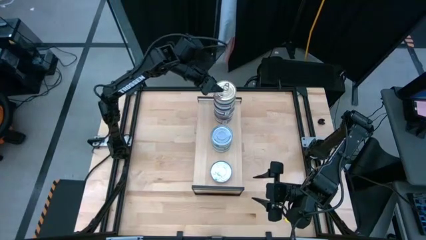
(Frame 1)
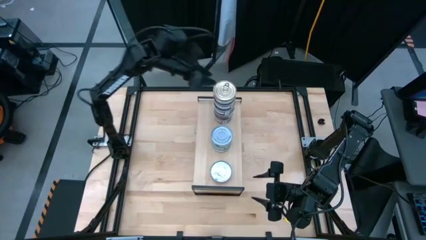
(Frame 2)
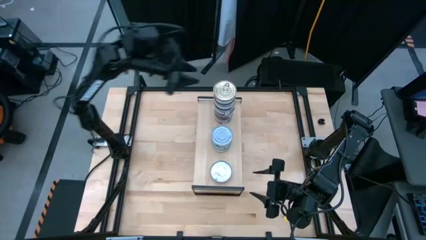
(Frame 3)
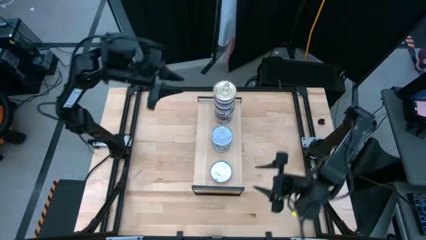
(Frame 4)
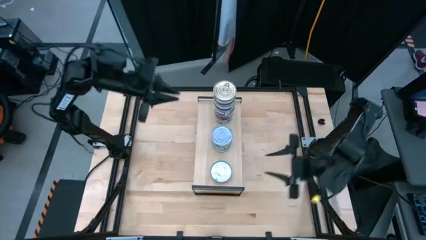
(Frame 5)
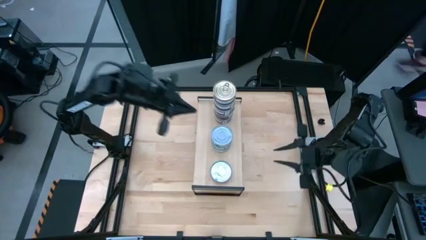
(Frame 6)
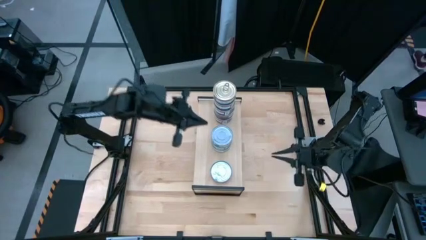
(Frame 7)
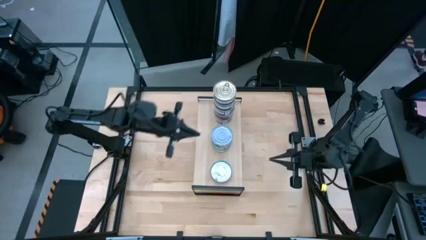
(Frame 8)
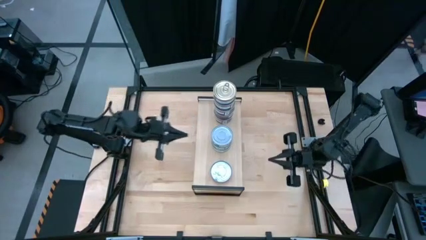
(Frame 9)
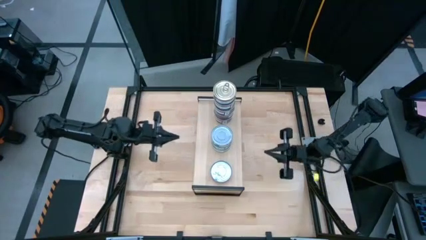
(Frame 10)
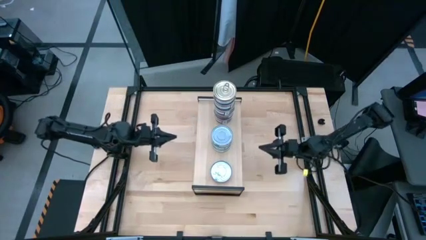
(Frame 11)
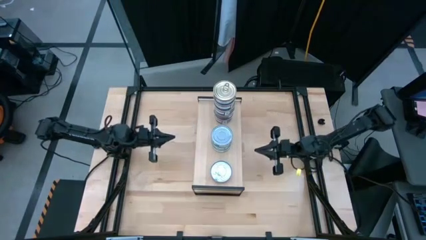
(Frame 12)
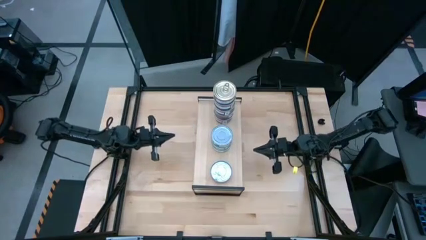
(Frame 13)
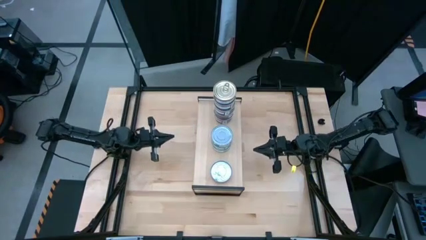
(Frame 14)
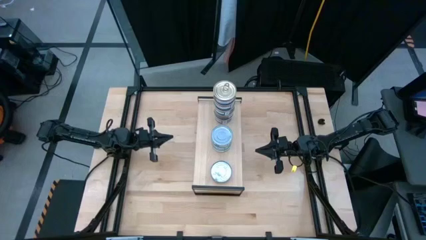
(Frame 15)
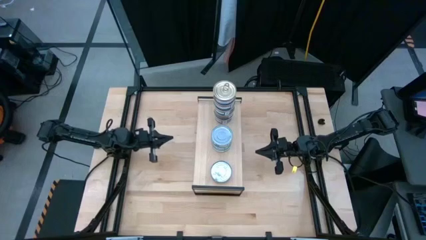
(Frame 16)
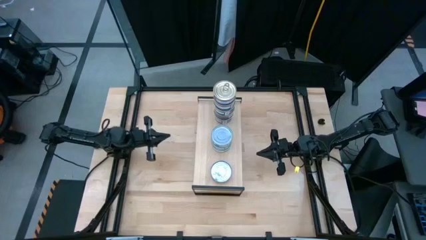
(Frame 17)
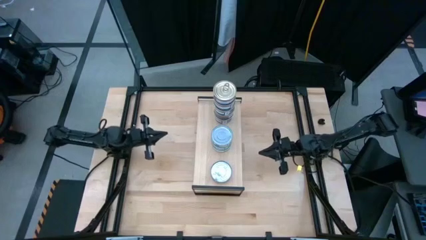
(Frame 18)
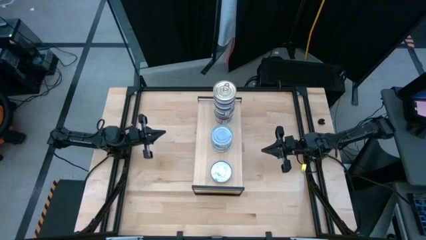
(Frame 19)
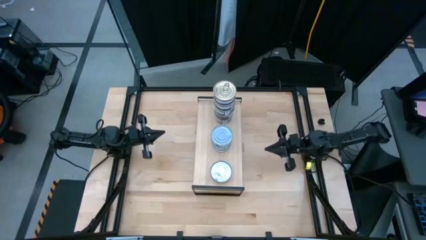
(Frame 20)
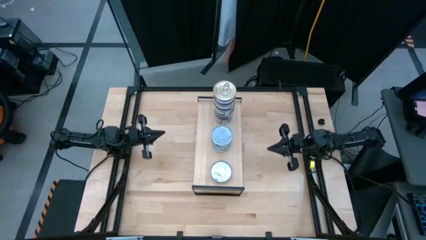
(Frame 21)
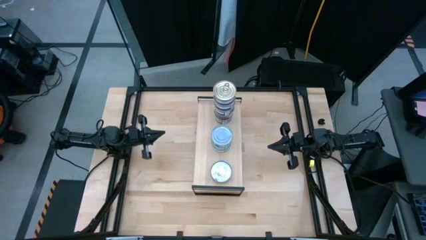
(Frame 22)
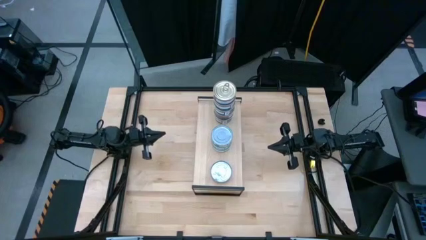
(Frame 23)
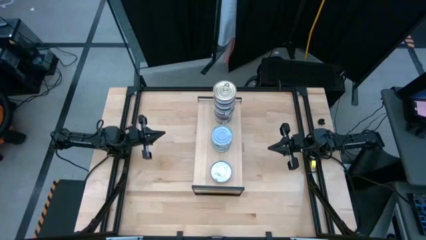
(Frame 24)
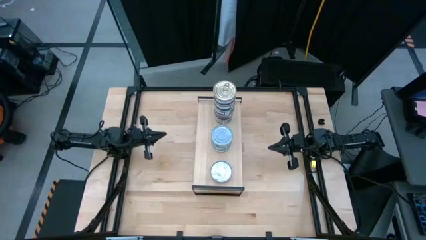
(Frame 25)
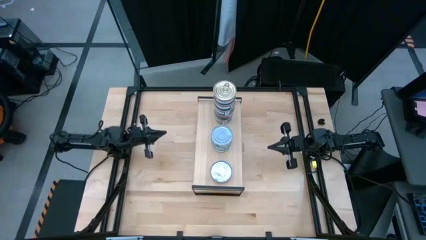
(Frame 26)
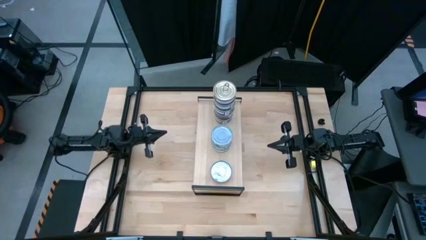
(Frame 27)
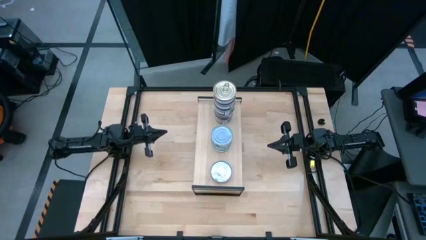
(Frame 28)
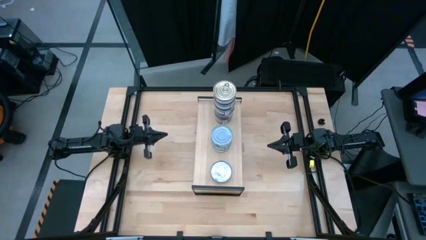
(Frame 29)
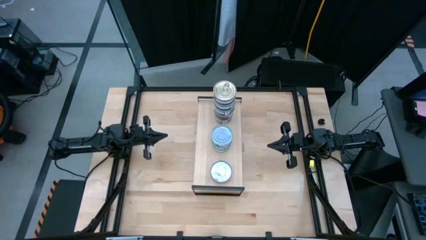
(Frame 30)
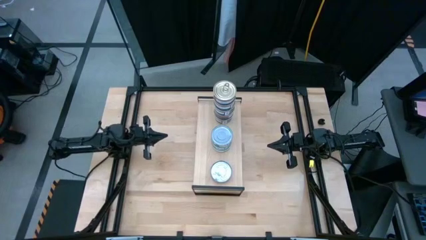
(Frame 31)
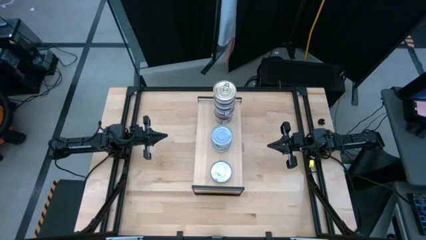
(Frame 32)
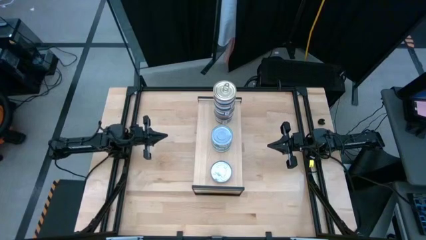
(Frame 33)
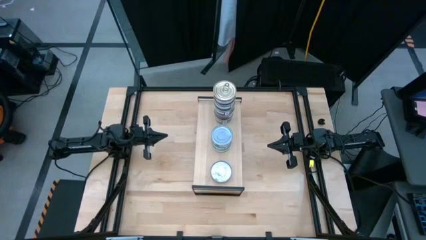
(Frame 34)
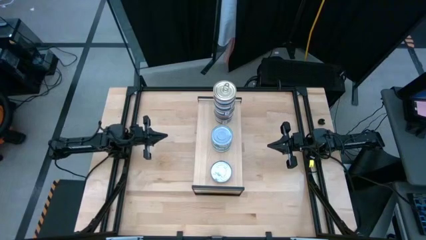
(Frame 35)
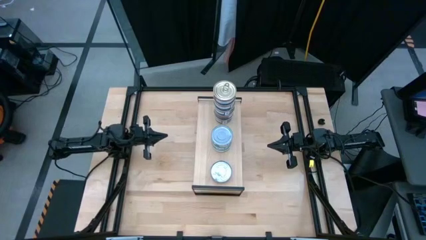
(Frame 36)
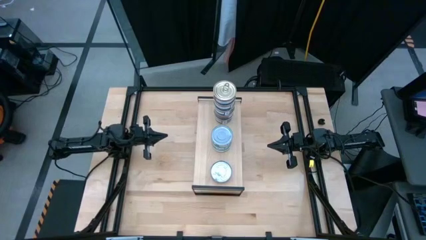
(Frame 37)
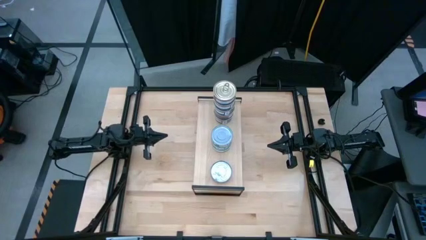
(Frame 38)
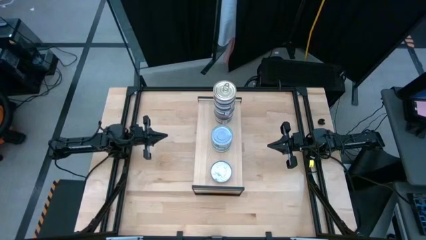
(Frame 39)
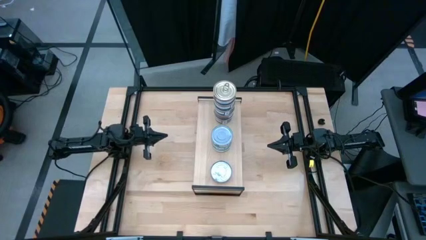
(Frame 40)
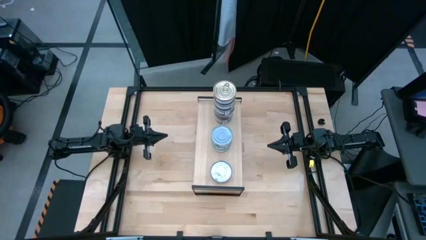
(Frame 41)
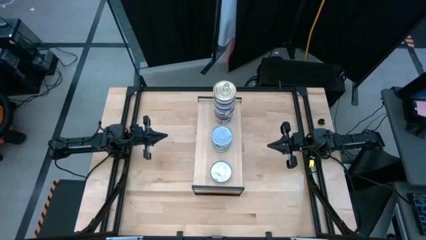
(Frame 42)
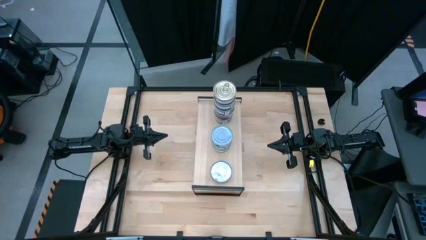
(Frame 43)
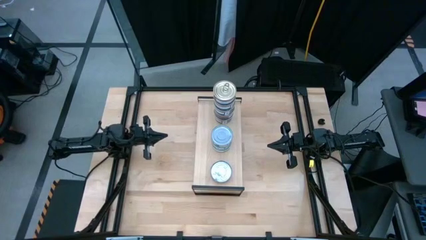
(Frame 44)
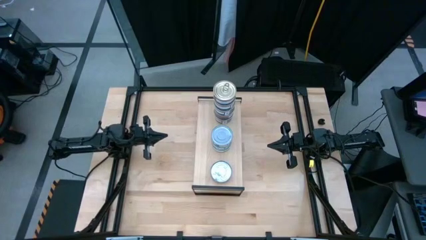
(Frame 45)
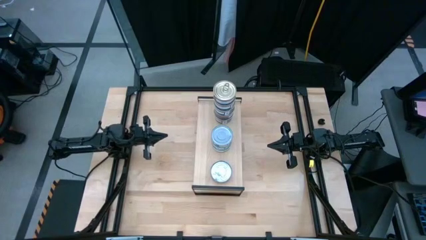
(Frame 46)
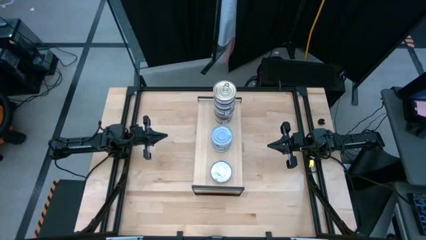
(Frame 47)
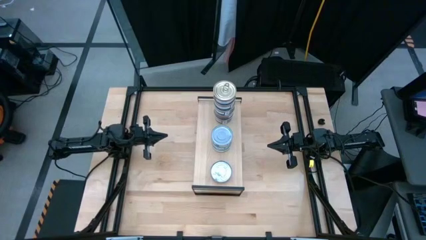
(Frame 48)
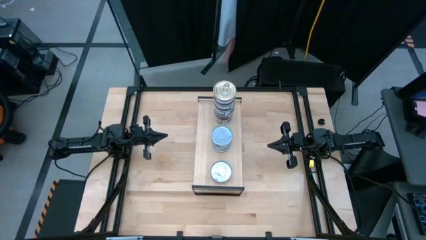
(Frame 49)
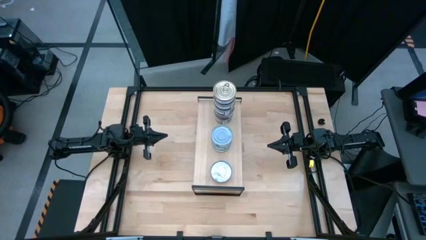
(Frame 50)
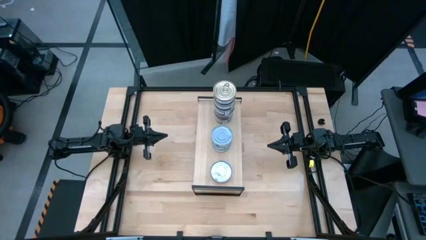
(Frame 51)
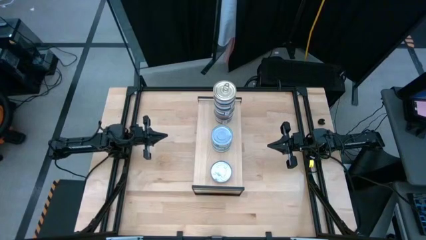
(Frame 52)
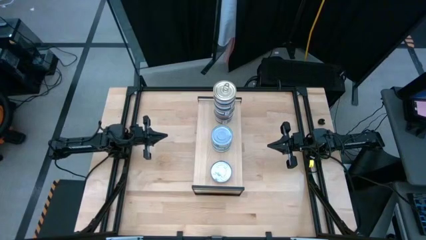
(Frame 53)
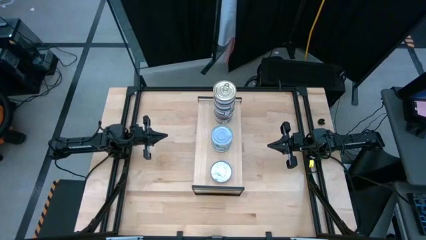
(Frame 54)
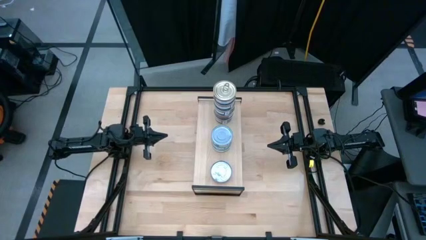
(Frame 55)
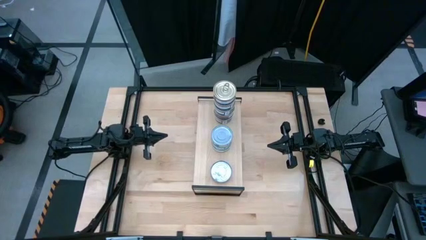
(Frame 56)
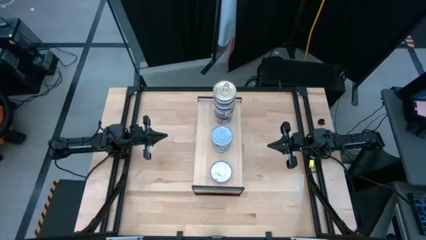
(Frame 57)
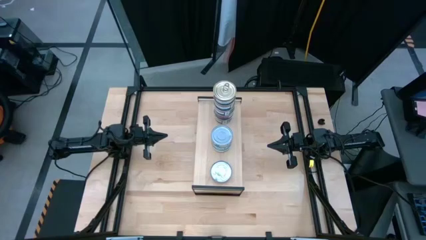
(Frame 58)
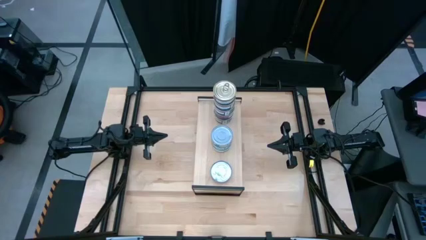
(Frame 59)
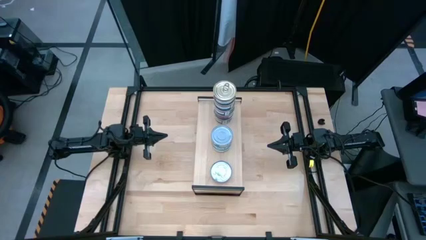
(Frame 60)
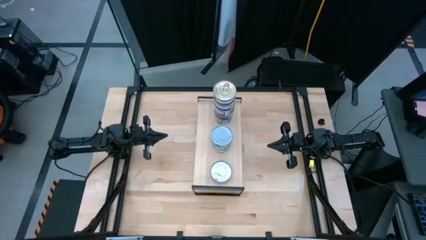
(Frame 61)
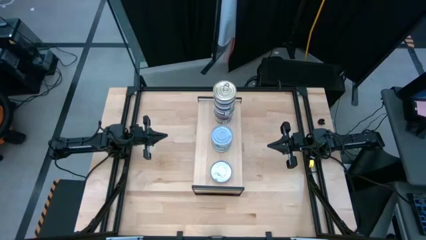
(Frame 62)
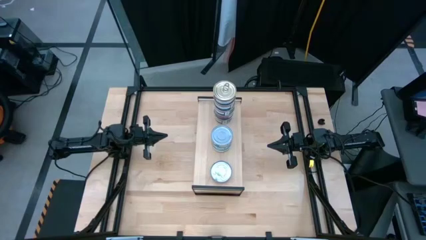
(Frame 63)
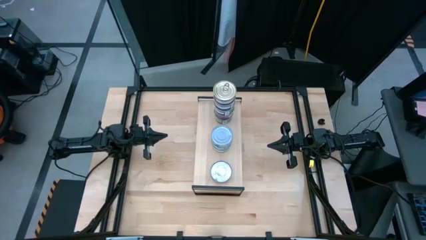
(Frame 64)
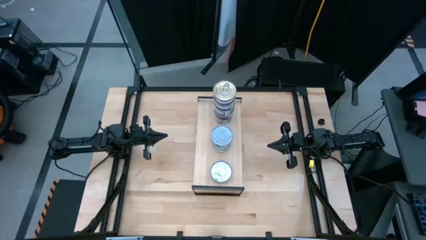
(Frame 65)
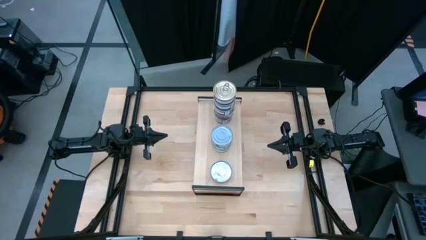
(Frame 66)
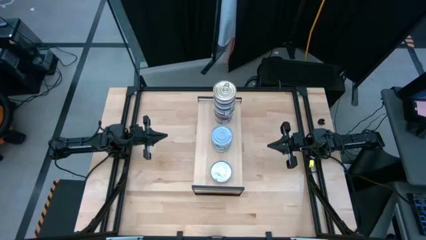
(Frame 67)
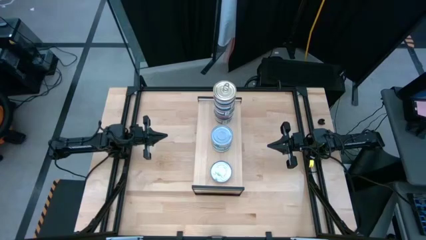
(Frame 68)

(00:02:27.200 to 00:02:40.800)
Task: Stack canned seafood by type on shelf
Return to Home Position

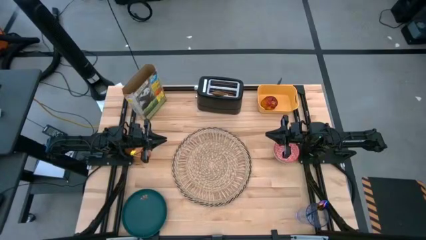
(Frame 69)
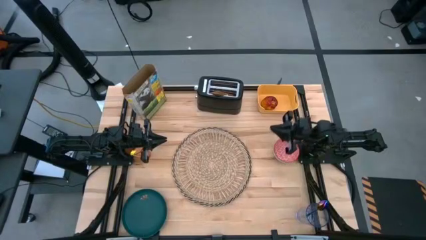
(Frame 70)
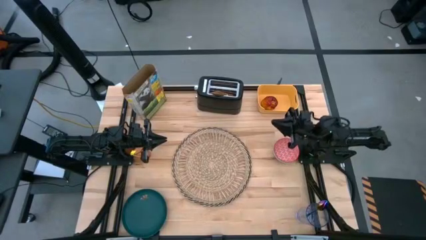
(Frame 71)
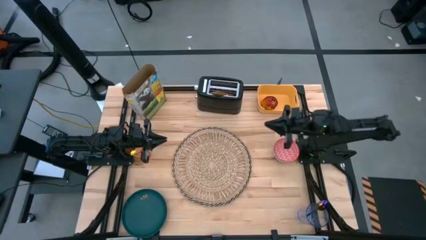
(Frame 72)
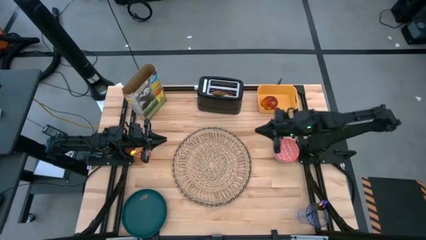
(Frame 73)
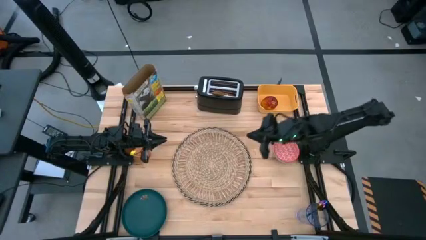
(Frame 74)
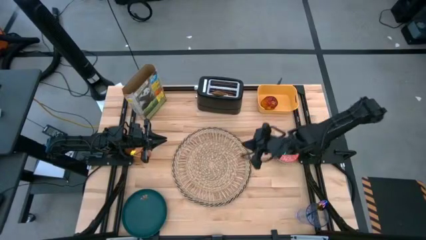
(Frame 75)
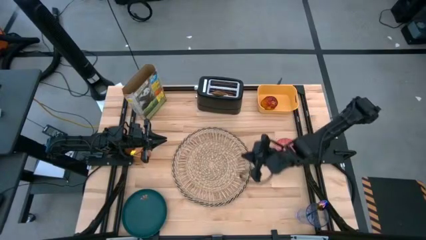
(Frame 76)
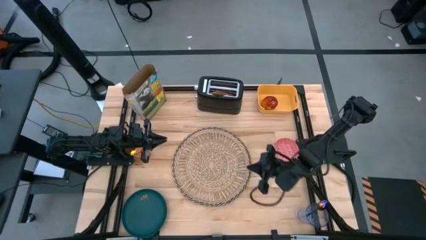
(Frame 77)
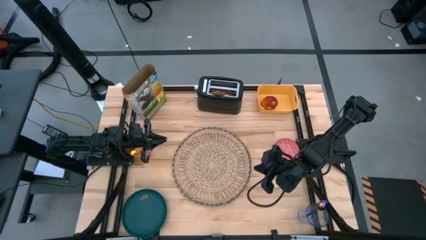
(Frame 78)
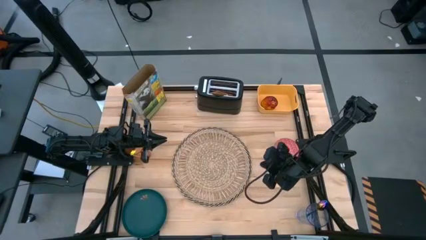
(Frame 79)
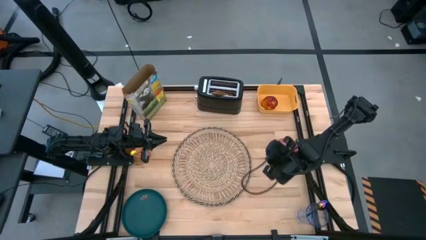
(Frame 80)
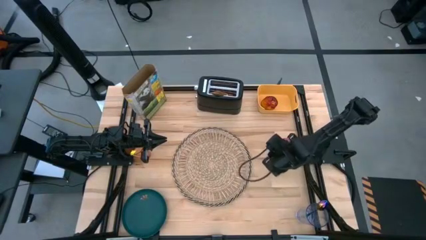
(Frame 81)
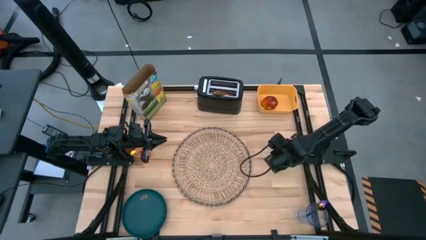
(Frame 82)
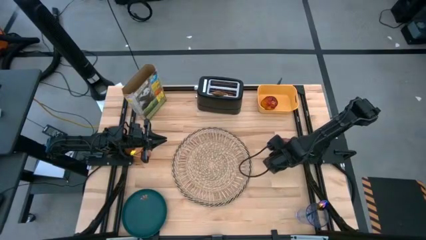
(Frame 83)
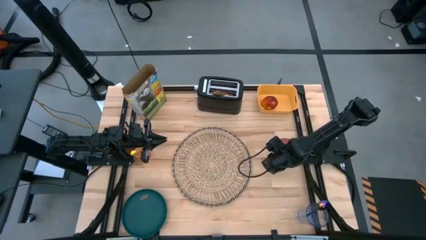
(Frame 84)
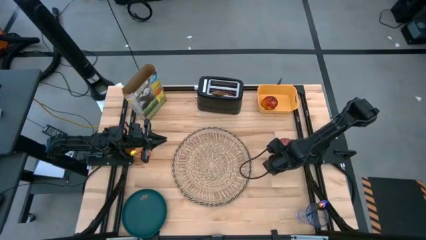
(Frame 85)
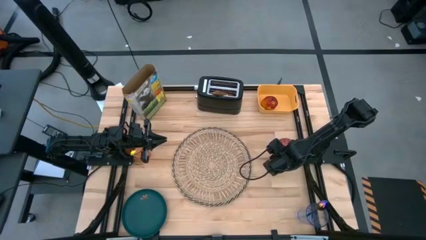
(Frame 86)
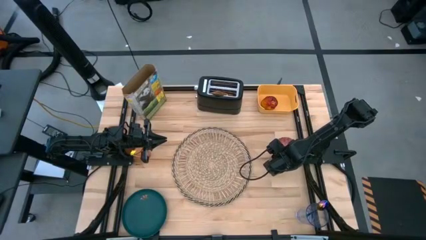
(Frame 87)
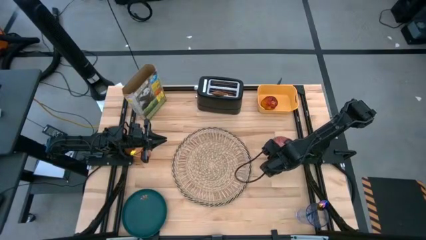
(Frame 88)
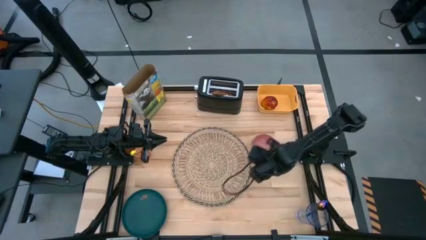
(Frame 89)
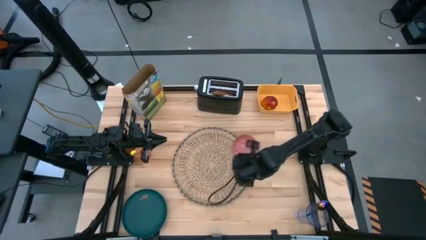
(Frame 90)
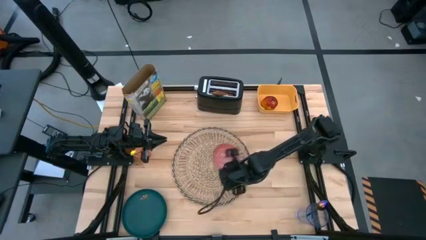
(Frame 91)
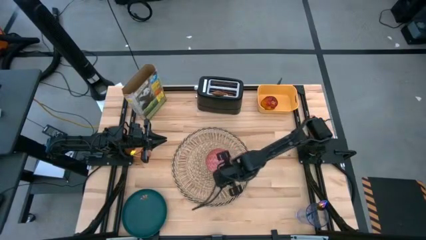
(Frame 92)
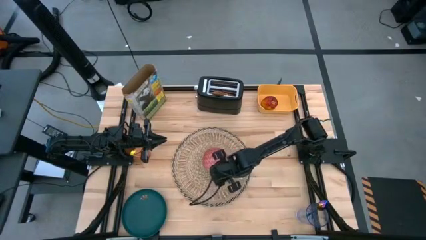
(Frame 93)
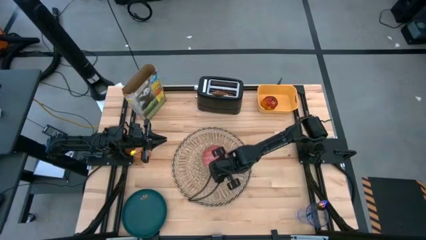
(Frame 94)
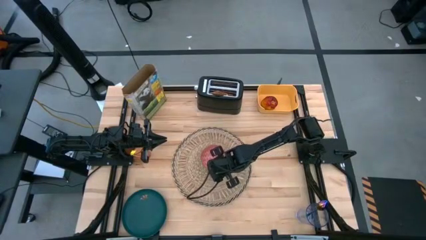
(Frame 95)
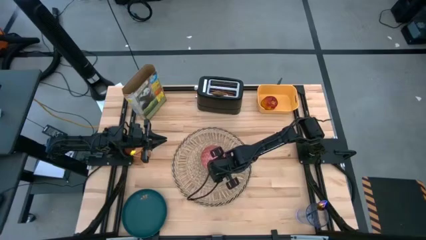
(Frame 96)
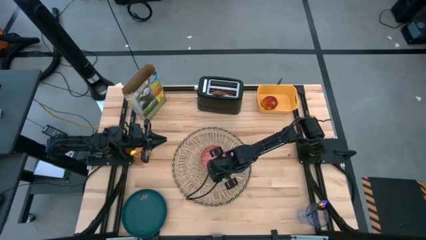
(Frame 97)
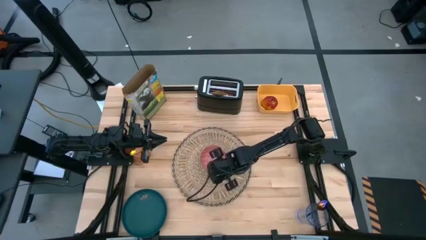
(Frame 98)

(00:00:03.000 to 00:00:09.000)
Task: Arrange a breakfast setting
Put the red patterned bowl on the brown place mat
